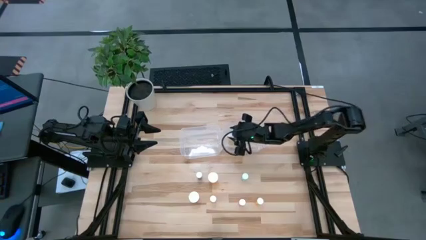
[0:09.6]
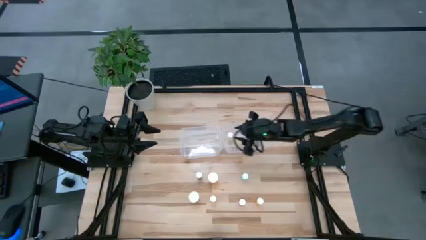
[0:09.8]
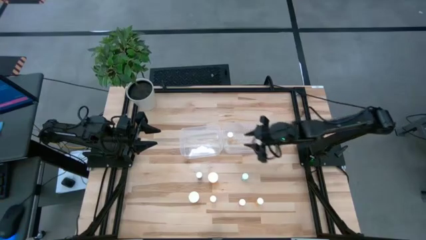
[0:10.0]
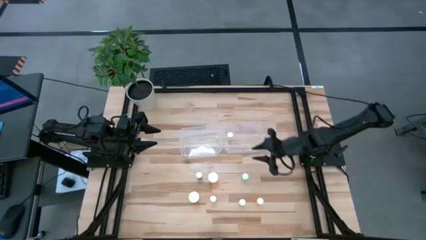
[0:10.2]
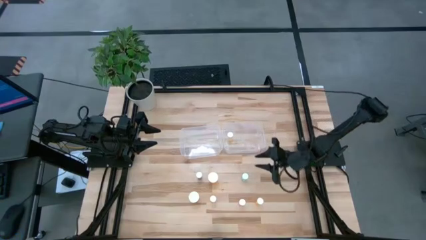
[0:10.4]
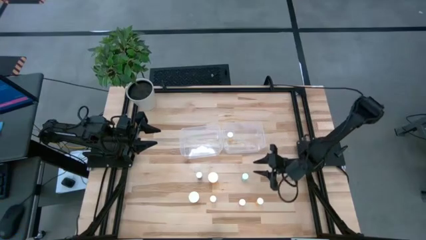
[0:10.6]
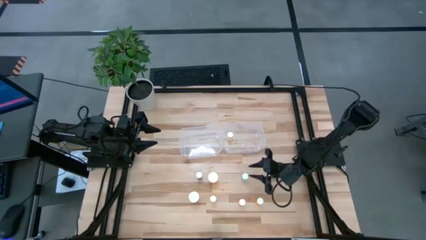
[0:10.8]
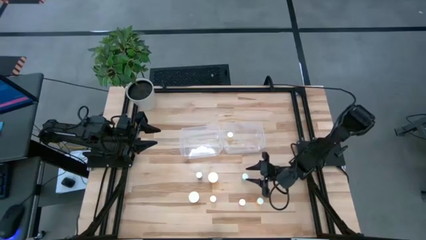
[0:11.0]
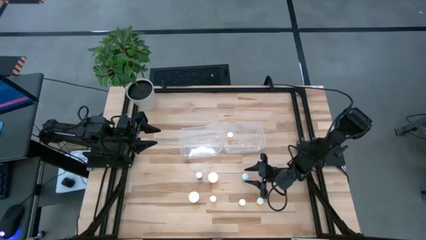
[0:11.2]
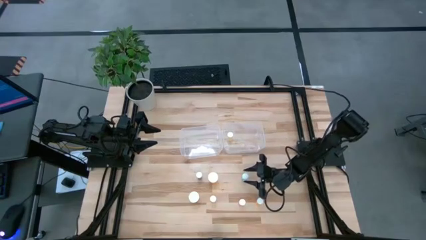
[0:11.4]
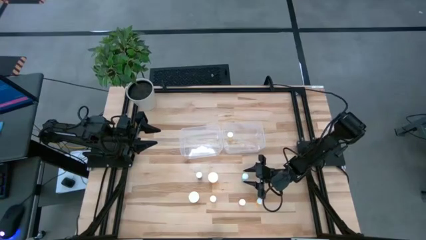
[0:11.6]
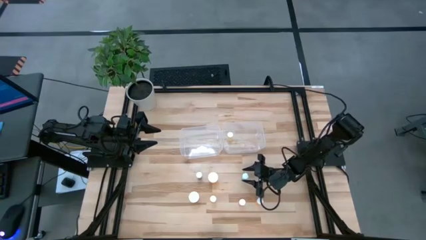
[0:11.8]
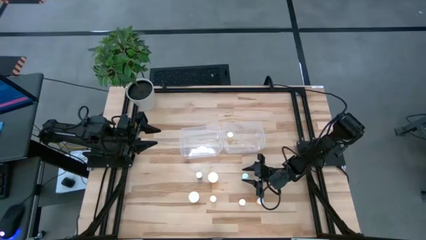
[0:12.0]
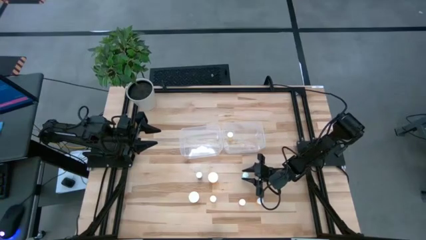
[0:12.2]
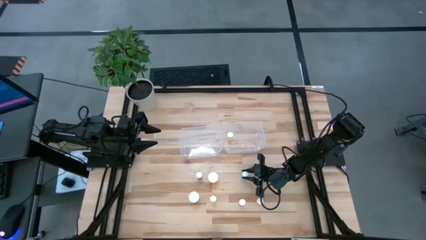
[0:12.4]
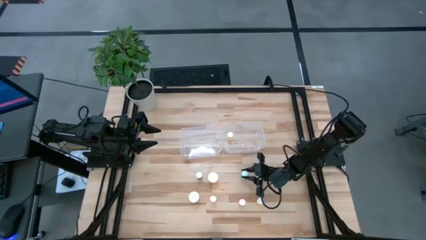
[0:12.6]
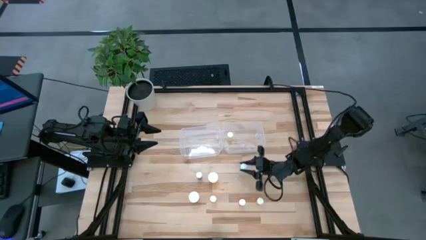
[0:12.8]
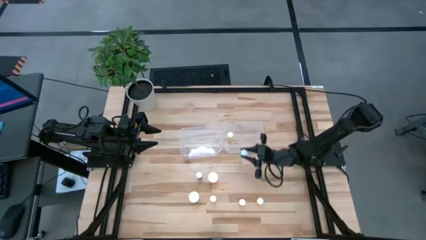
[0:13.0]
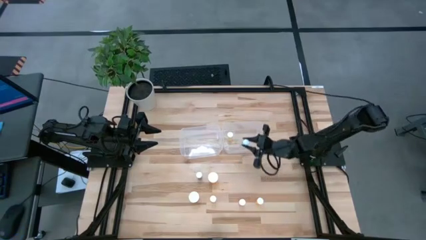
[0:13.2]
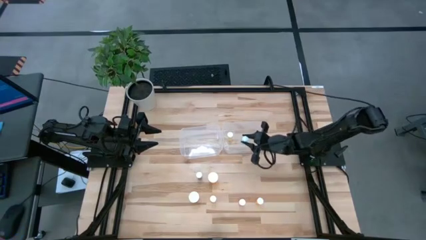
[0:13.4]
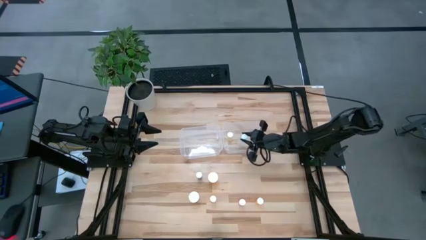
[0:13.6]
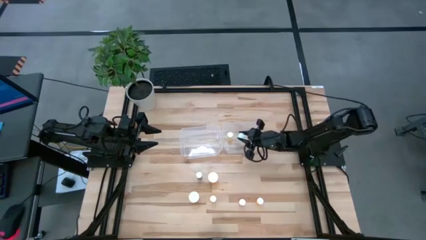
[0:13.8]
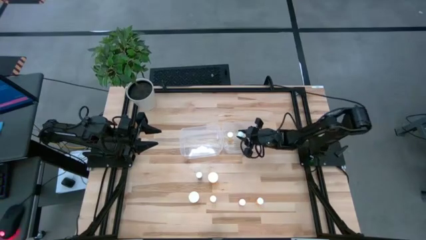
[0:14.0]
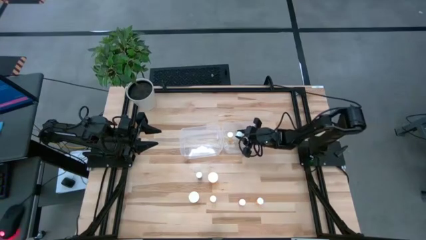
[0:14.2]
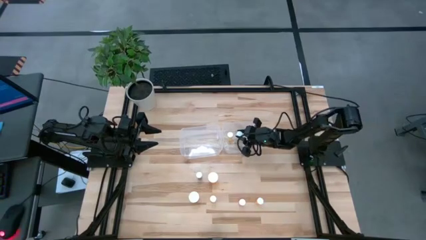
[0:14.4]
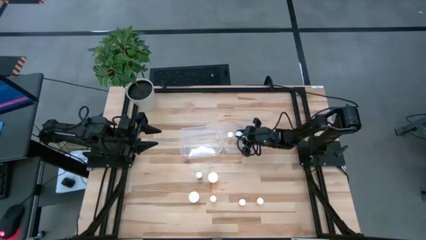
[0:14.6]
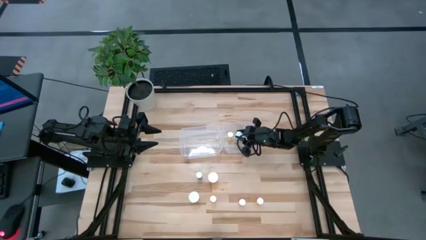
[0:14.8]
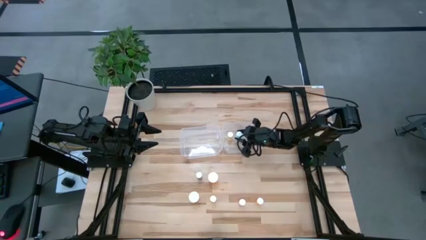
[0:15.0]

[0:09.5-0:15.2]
Task: Pick and place medicine bottles into bin by pill shape (circle, oval)
Put the green pill bottle into the right transparent bin

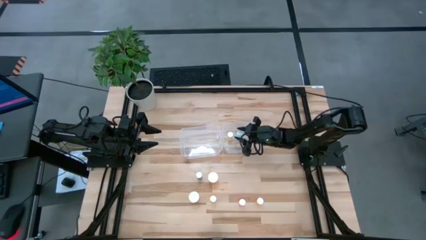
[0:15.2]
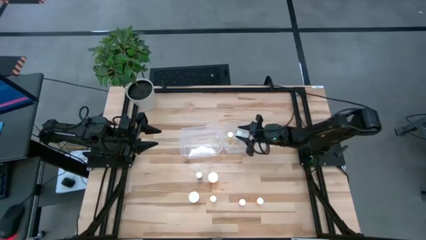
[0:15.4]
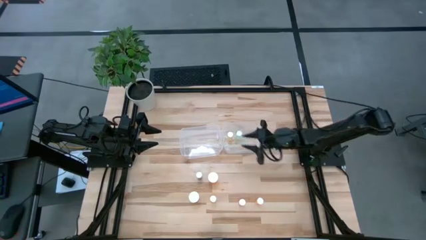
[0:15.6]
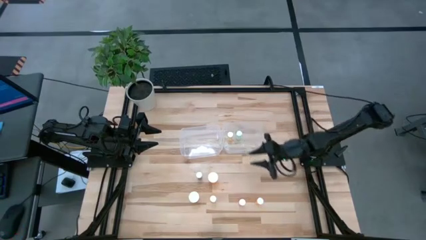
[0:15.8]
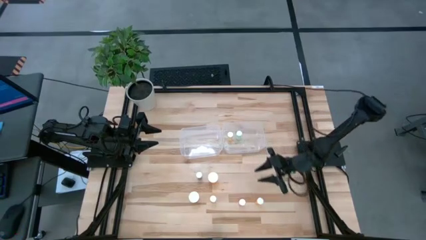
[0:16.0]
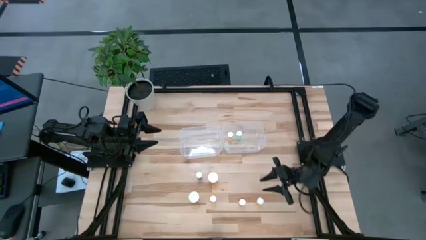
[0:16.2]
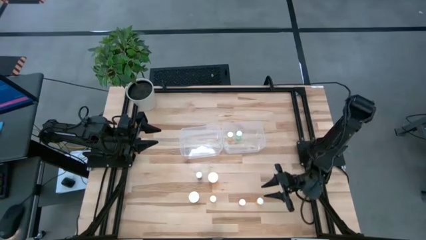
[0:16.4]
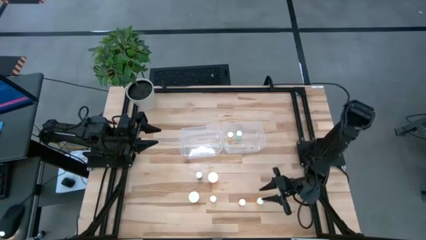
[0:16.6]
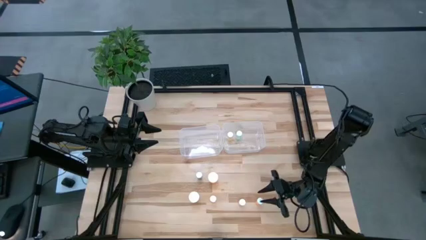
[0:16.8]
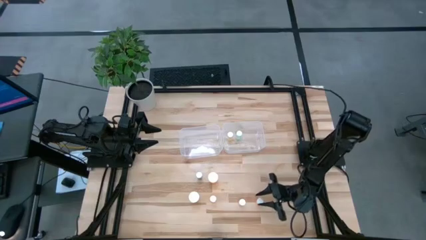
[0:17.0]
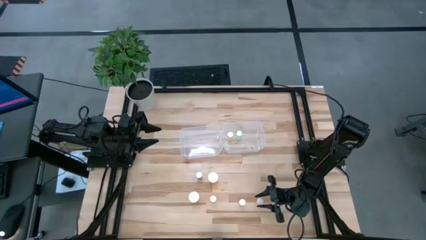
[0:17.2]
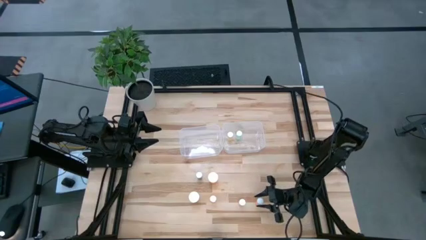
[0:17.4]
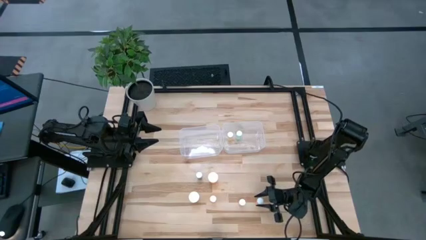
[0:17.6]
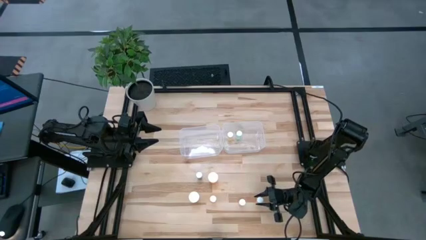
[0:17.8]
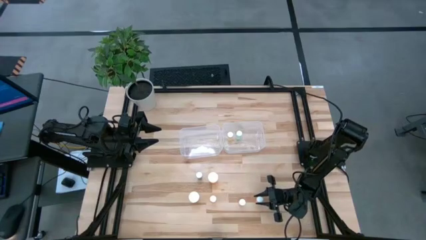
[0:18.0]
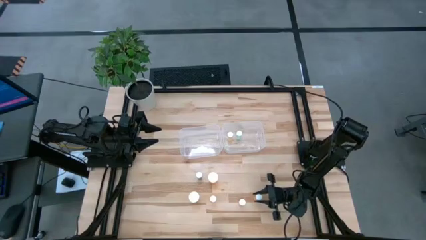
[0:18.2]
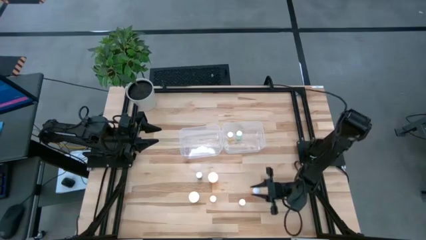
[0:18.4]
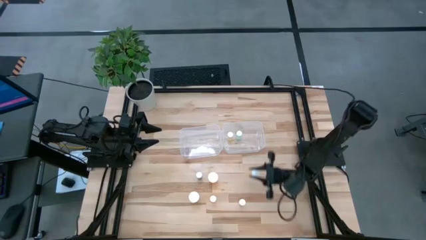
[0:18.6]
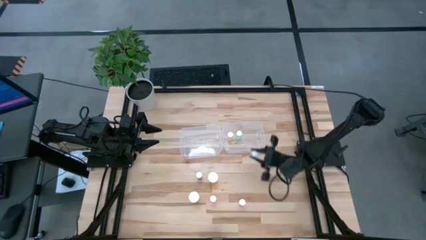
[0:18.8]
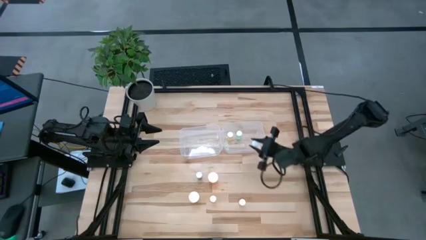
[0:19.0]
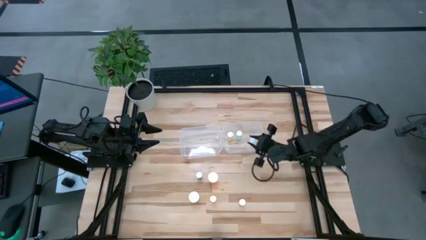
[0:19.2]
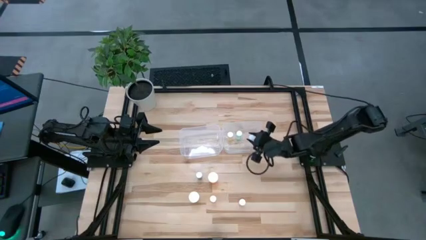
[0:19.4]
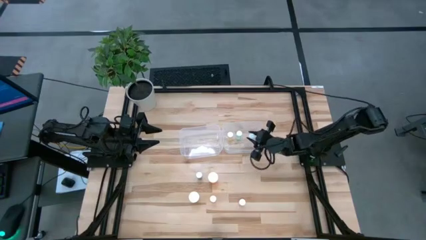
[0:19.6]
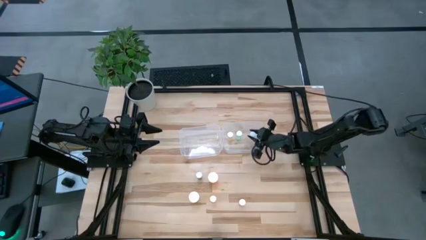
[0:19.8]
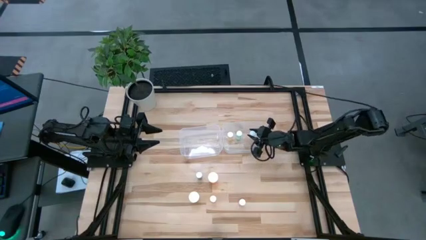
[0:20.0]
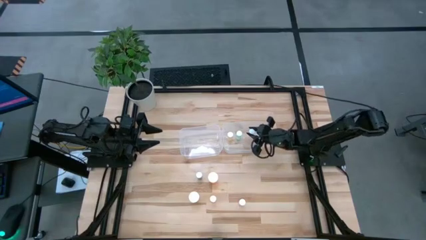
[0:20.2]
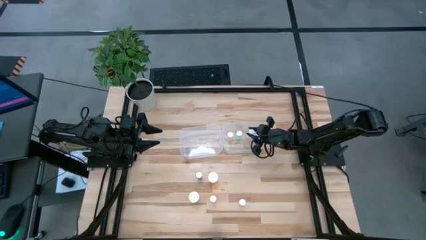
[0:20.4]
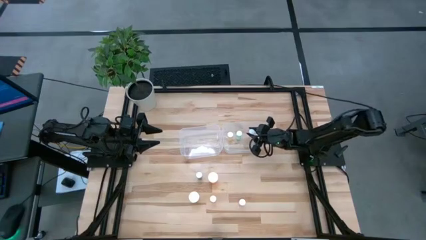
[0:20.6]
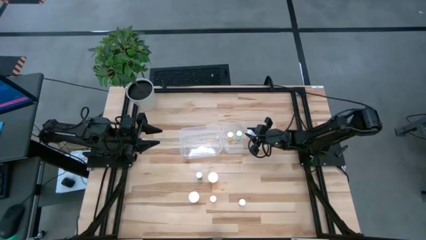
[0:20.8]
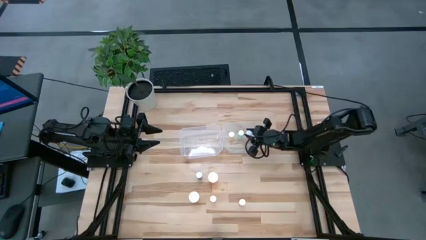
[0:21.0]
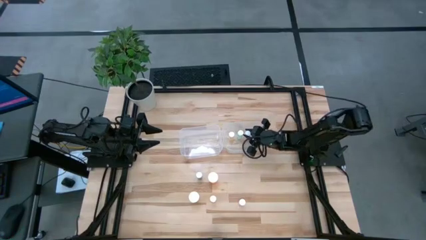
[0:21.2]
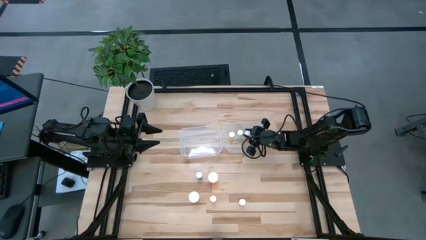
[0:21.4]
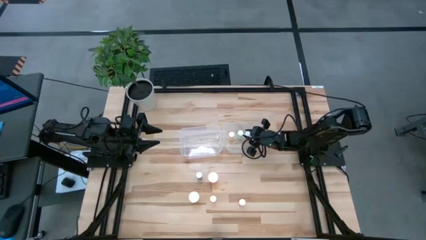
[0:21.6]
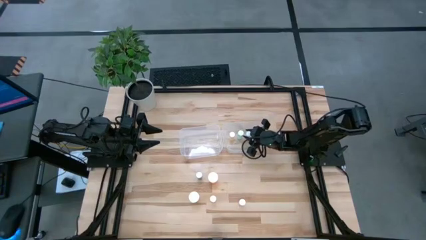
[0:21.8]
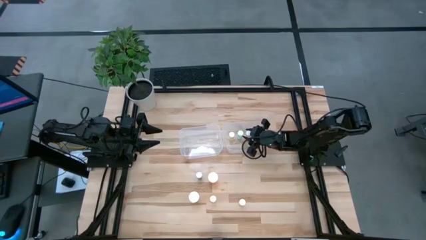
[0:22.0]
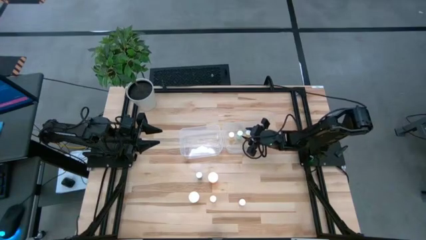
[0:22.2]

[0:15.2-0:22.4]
Put the right small orange pill bottle into the right transparent bin

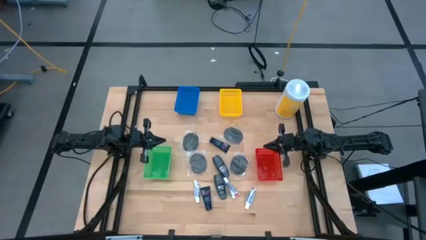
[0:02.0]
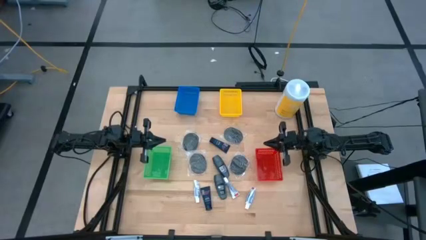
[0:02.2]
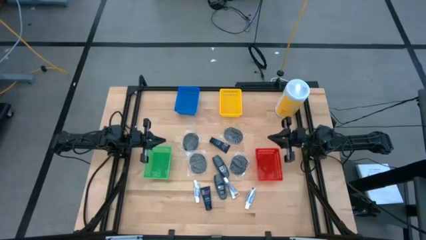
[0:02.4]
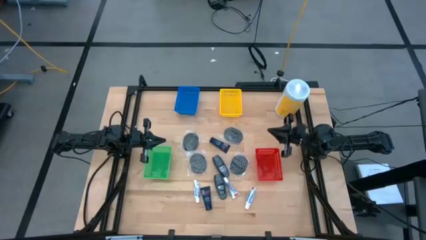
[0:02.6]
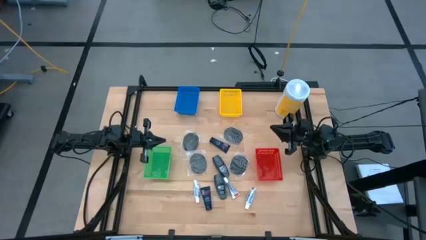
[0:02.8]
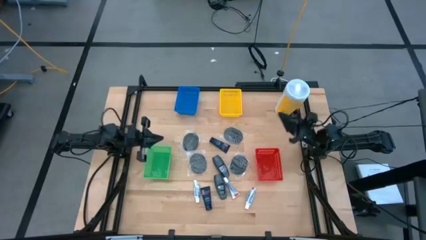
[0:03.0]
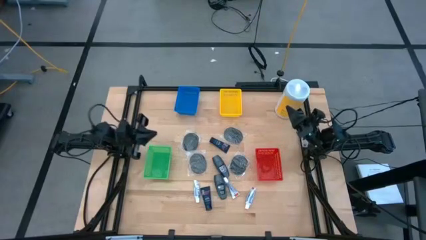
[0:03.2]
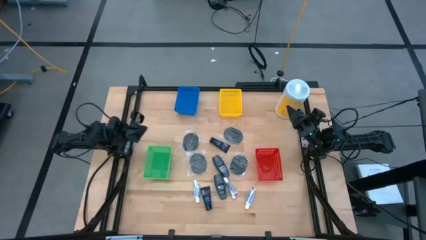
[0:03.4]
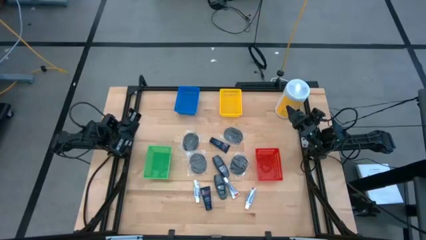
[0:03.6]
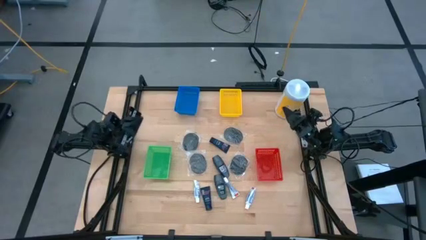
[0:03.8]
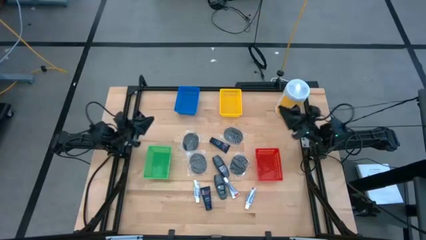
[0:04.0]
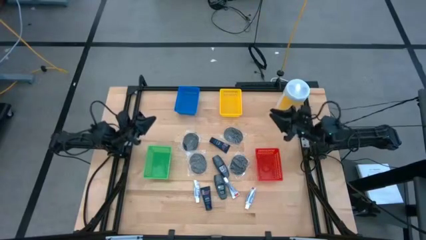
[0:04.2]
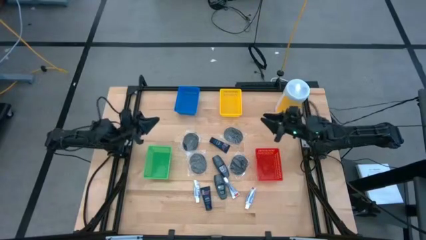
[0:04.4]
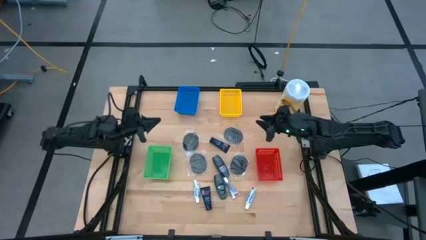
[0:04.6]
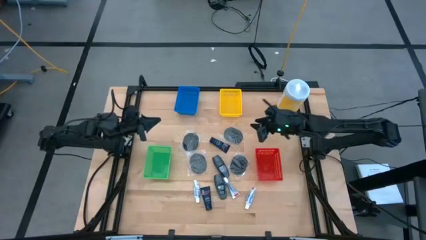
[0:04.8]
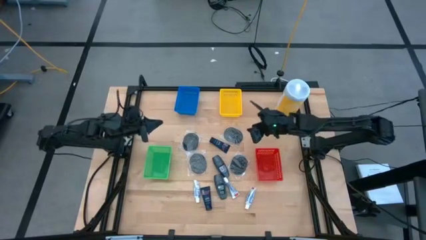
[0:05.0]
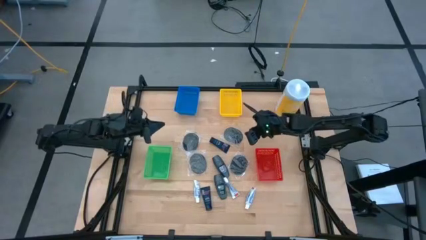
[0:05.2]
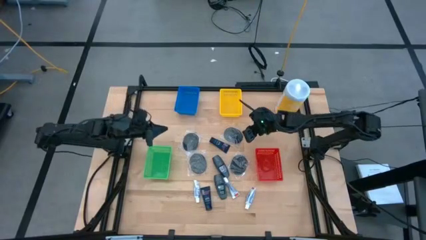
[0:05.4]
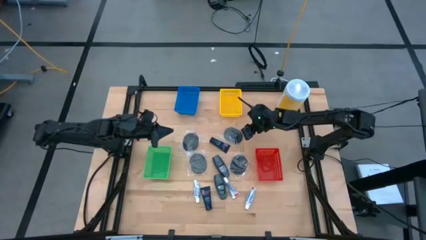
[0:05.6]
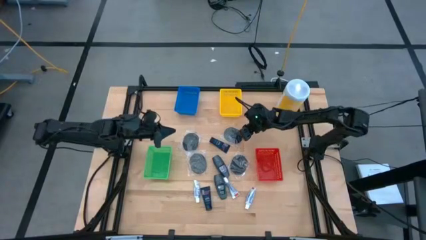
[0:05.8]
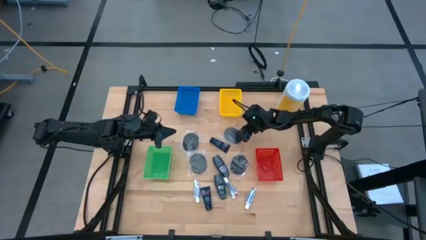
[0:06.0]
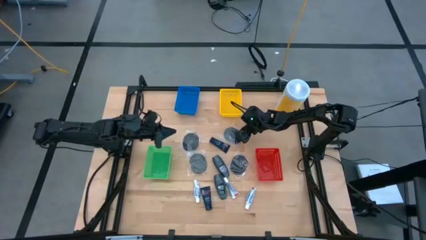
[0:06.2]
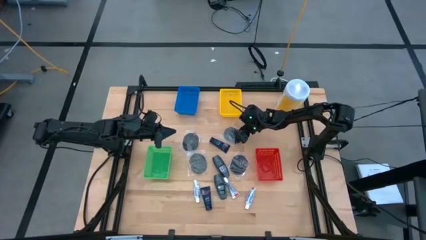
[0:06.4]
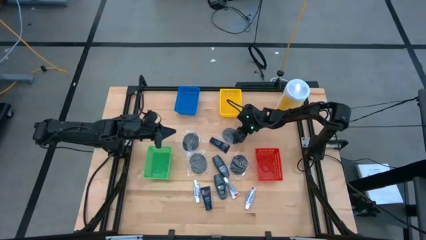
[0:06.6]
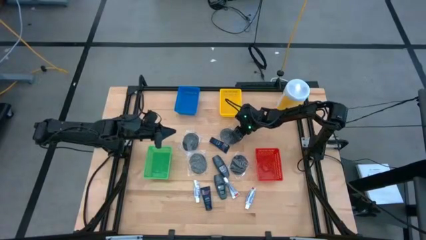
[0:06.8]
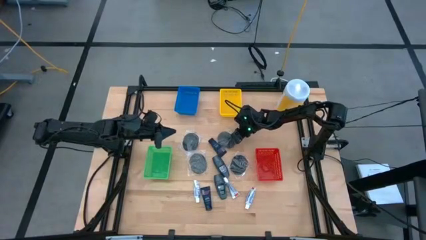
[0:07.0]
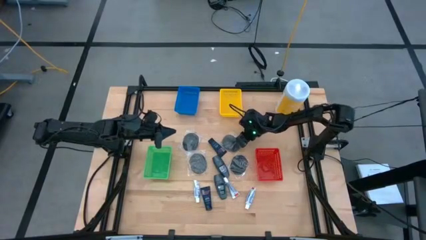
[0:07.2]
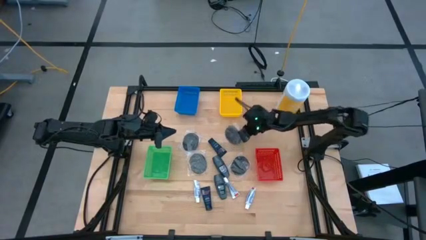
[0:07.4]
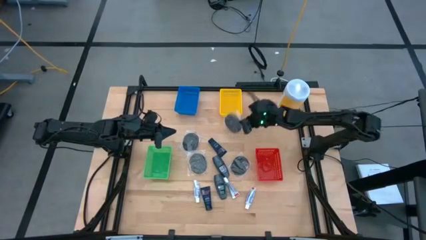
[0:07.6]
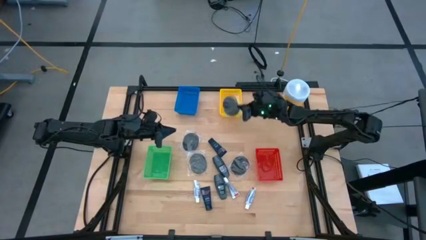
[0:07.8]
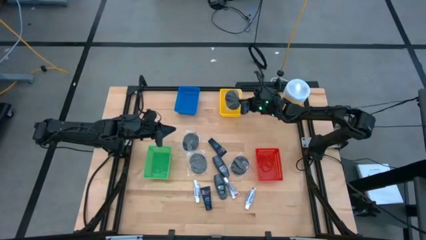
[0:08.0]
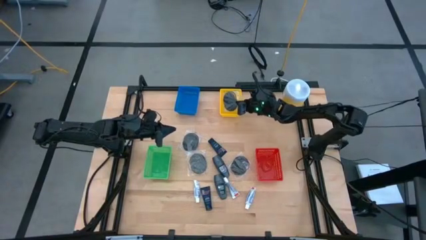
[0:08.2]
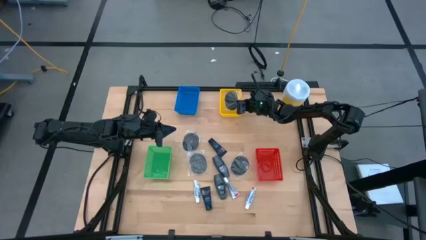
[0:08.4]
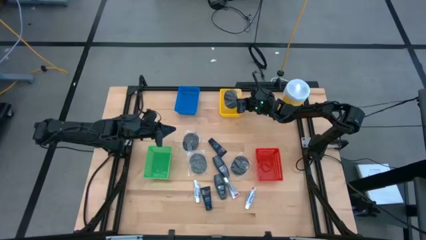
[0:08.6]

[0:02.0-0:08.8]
Task: Pick & Place Travel size toiletries
Put the black hairbrush into the yellow bin
